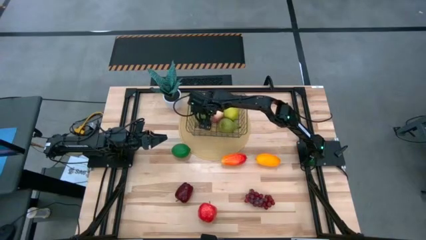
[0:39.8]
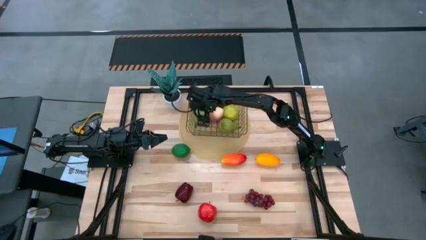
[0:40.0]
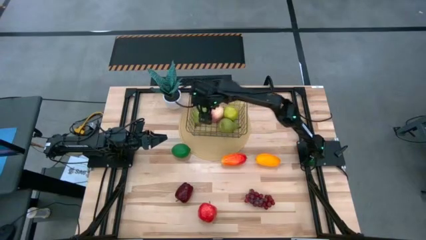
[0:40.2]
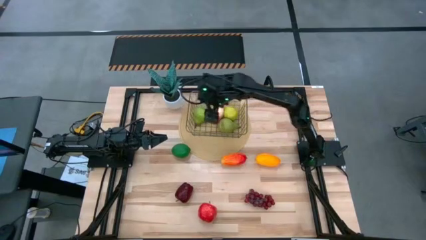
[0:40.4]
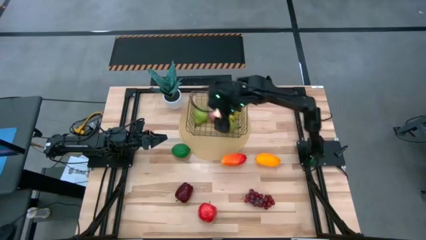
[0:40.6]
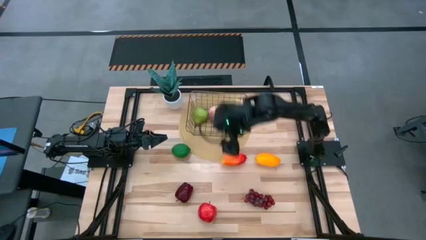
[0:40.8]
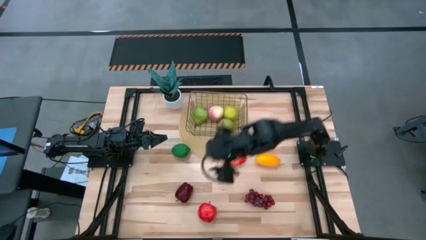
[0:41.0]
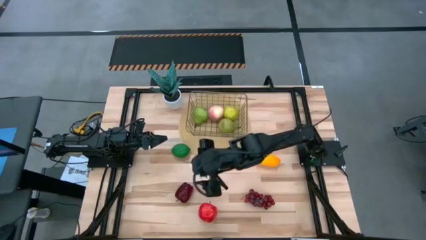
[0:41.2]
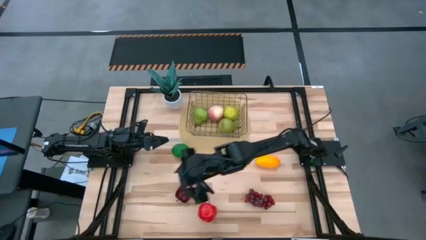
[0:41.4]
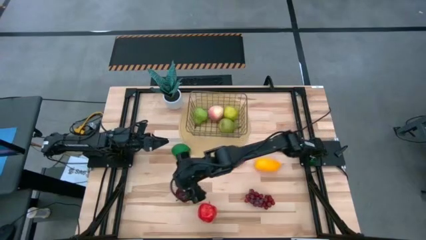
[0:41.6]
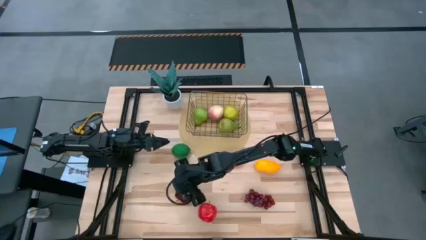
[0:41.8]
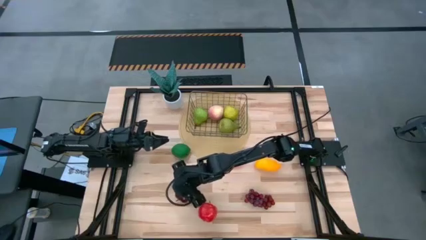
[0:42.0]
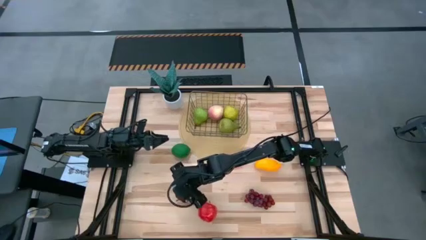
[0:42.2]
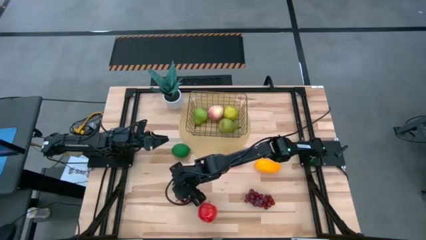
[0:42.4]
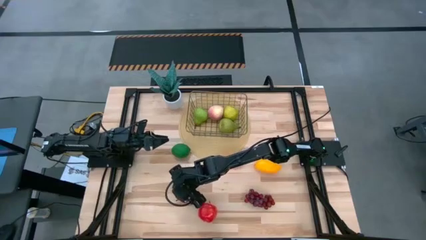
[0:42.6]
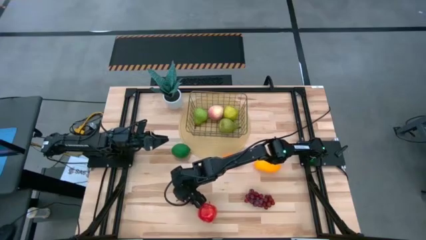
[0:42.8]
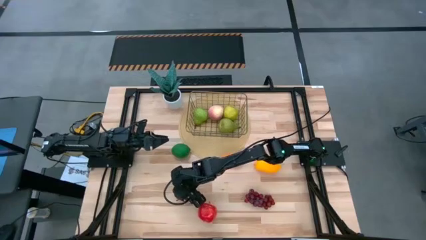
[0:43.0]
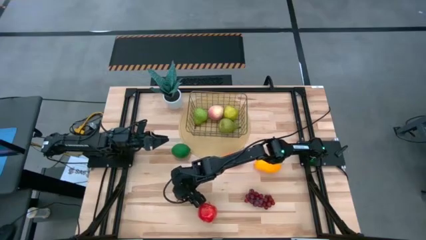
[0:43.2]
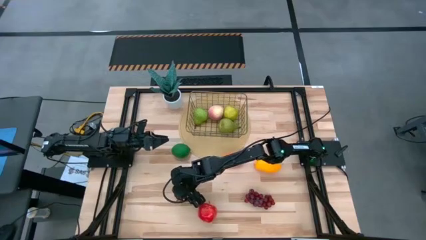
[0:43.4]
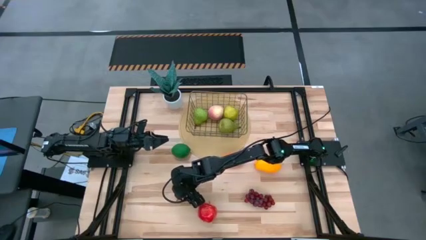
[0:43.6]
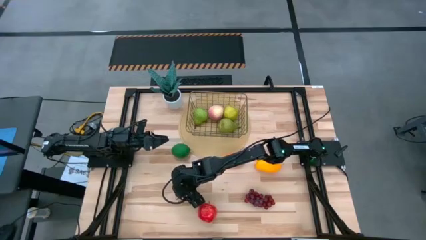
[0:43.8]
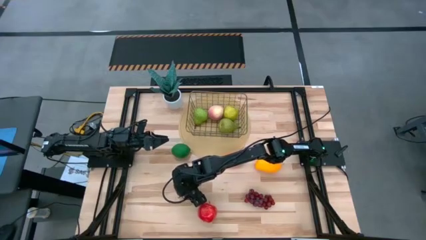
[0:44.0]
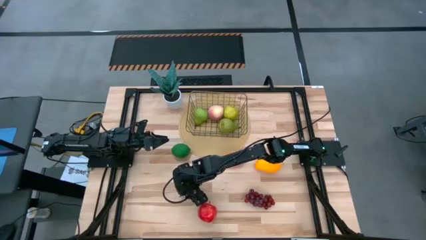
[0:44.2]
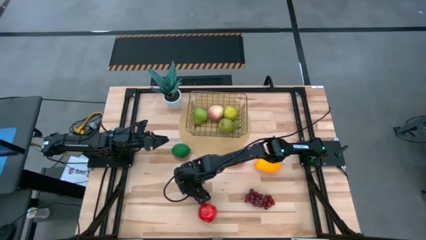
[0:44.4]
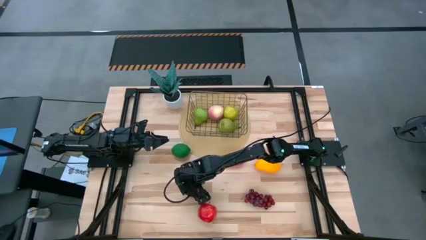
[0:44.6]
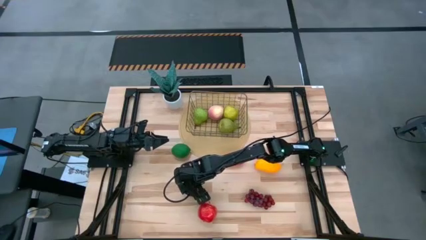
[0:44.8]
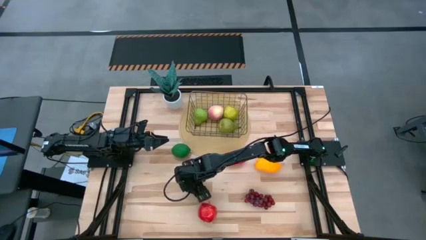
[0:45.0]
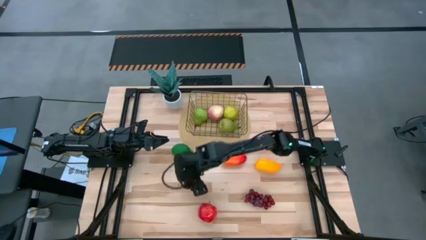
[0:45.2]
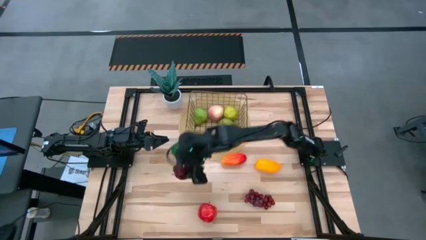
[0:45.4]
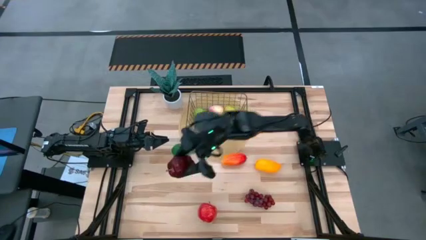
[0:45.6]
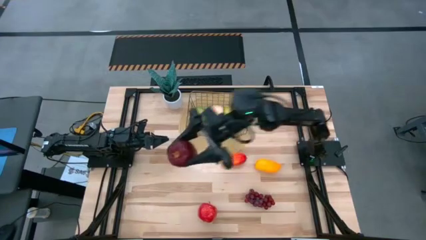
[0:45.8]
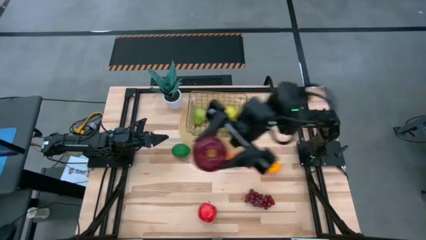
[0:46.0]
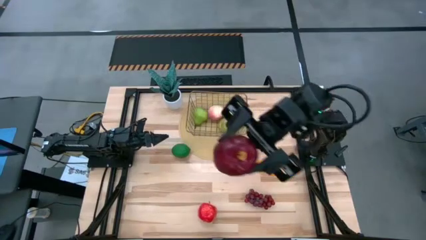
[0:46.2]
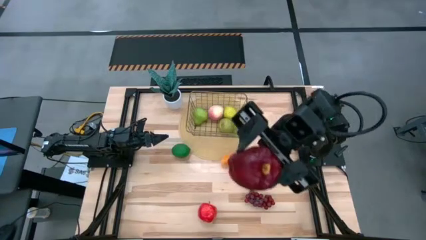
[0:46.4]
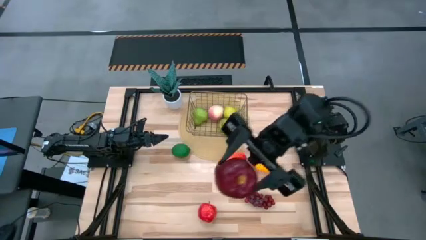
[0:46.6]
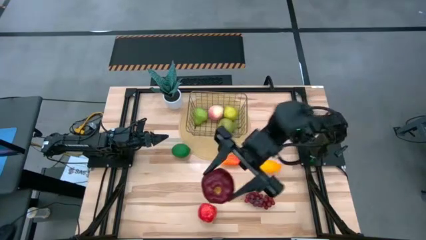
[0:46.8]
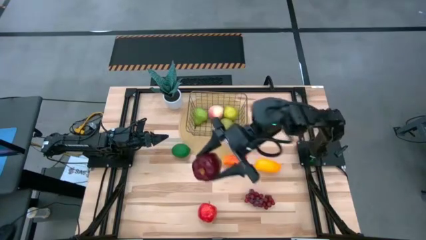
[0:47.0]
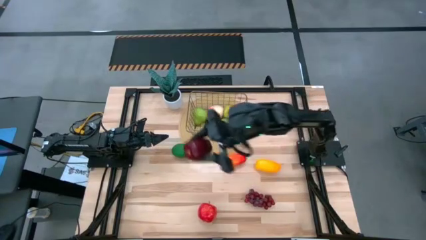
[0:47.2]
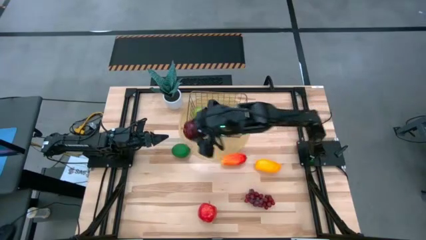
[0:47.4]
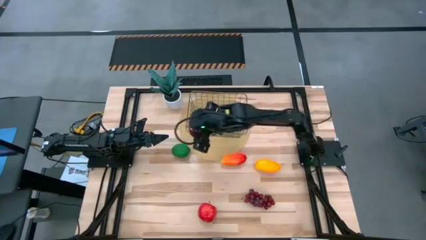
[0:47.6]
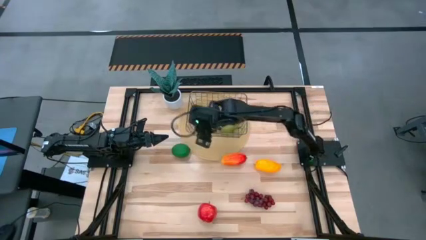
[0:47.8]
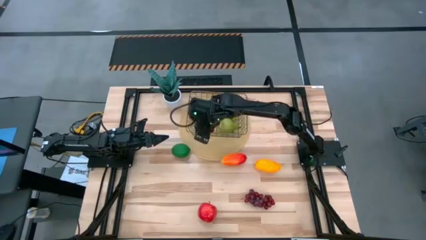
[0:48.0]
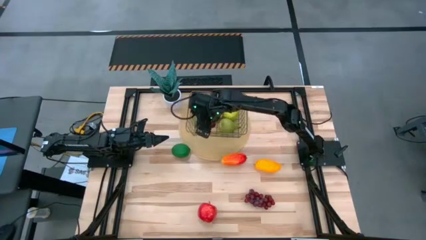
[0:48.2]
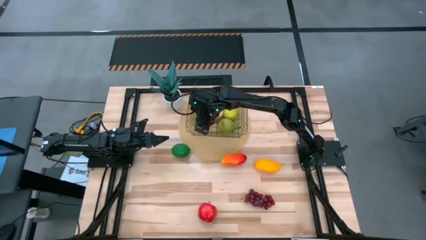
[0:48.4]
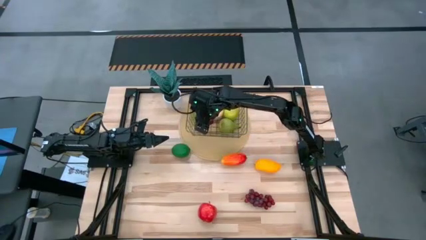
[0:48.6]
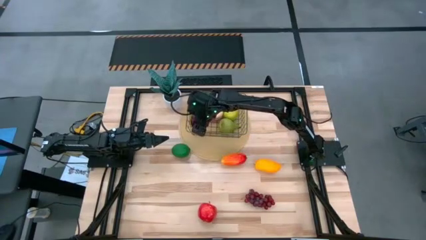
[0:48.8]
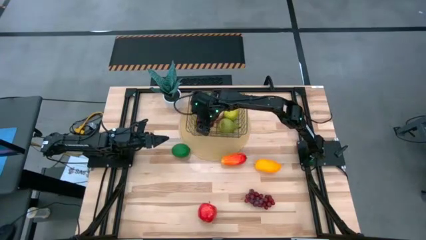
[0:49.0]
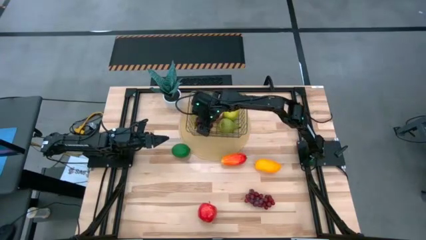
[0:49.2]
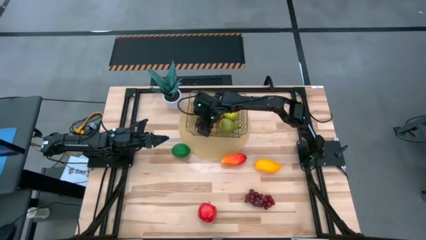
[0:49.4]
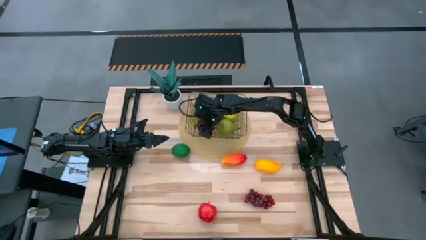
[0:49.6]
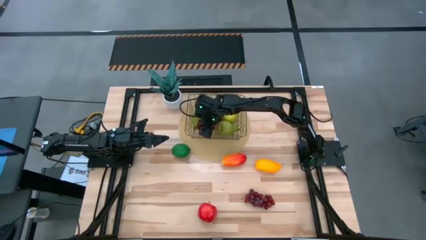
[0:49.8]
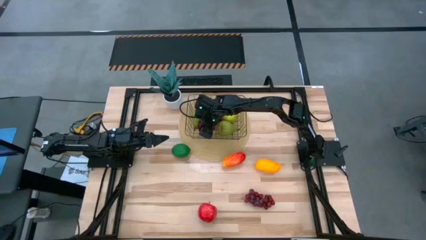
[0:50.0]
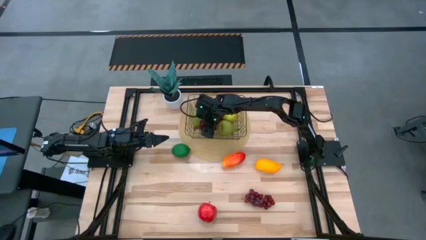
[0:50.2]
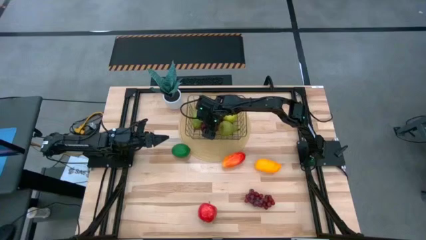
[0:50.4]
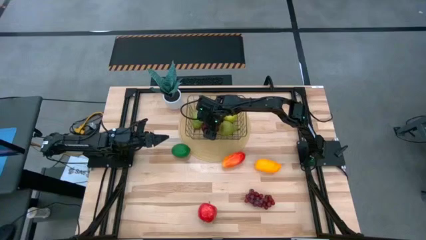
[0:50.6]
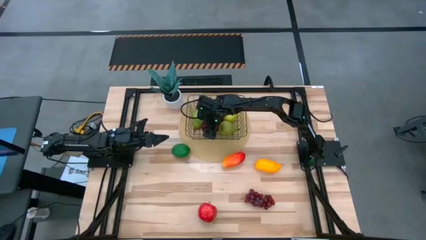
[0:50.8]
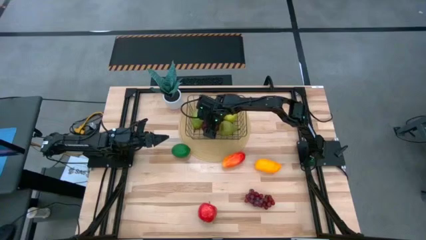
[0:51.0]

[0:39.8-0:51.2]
Task: Build produce basket
Put the dark red apple into the wire basket

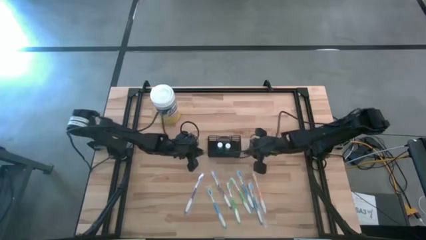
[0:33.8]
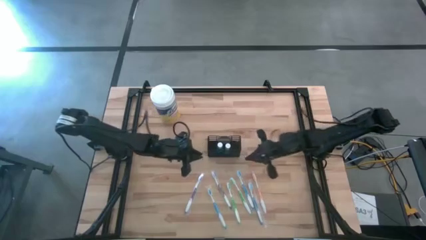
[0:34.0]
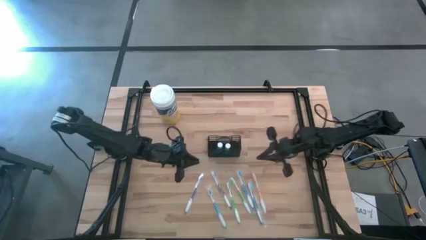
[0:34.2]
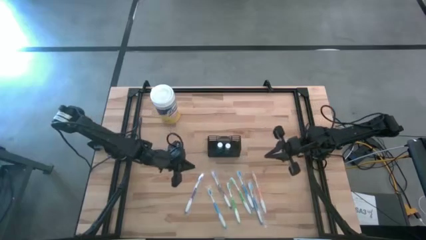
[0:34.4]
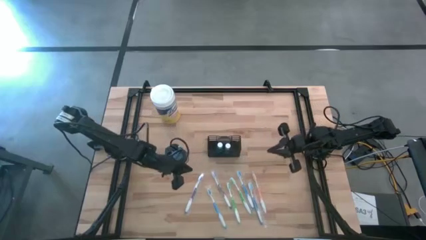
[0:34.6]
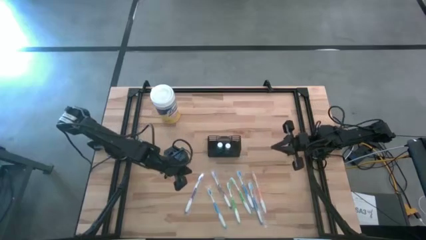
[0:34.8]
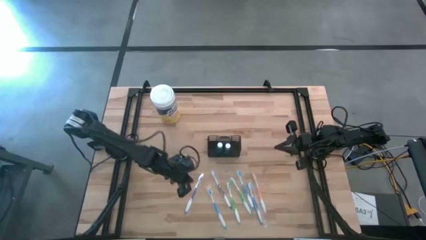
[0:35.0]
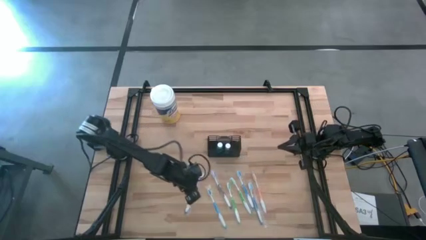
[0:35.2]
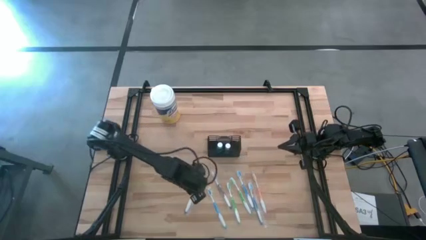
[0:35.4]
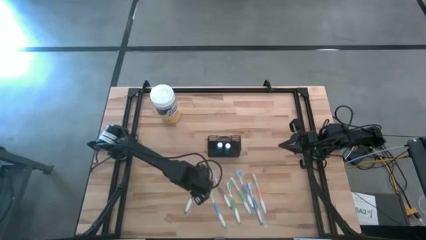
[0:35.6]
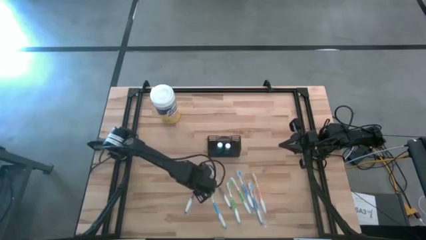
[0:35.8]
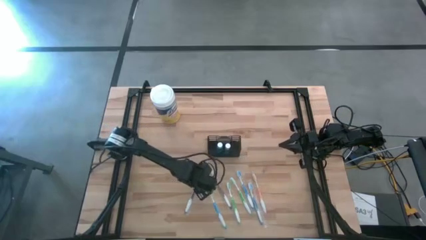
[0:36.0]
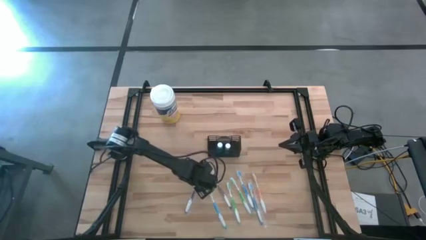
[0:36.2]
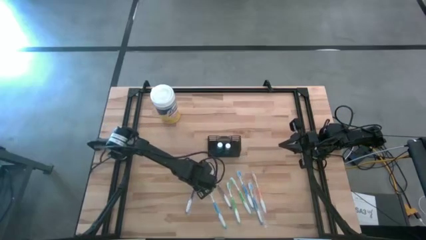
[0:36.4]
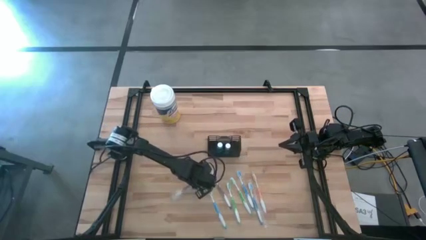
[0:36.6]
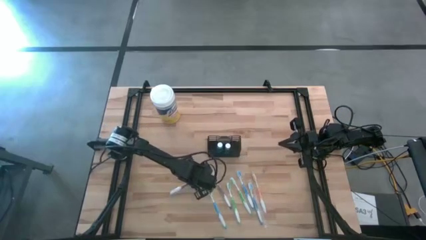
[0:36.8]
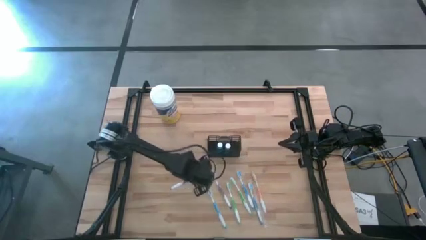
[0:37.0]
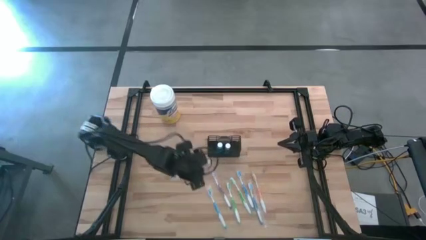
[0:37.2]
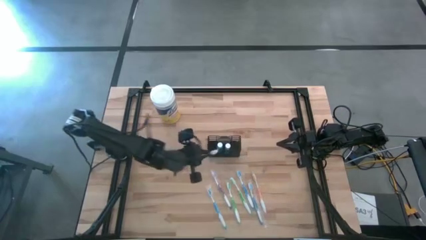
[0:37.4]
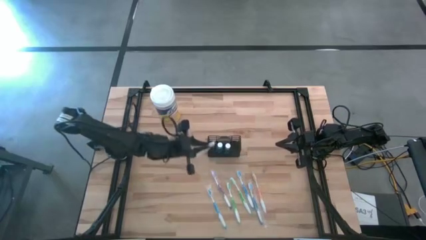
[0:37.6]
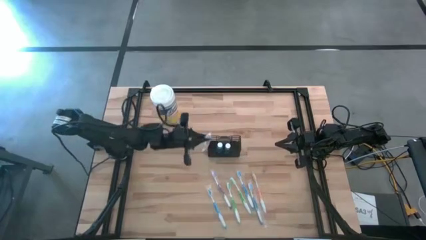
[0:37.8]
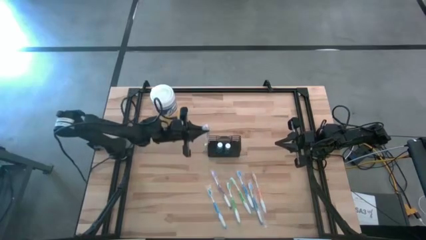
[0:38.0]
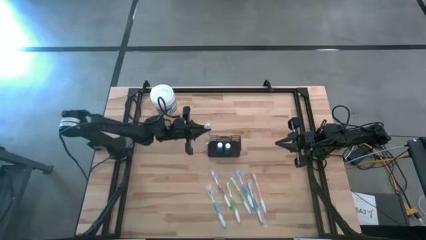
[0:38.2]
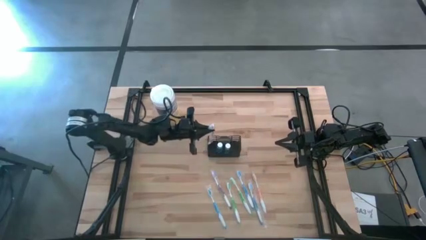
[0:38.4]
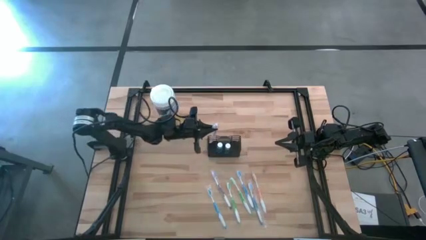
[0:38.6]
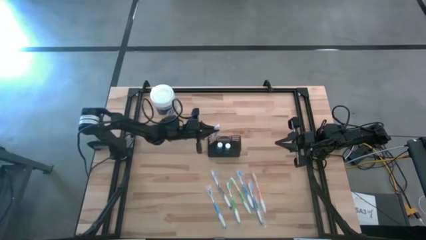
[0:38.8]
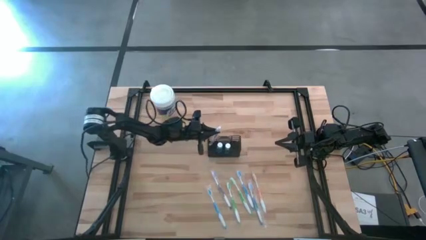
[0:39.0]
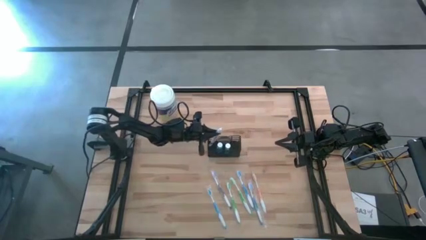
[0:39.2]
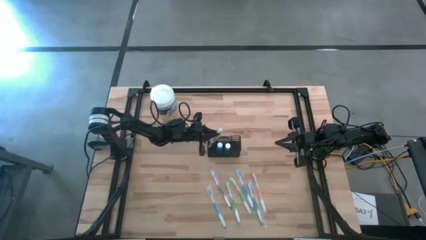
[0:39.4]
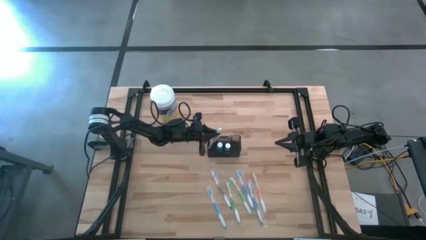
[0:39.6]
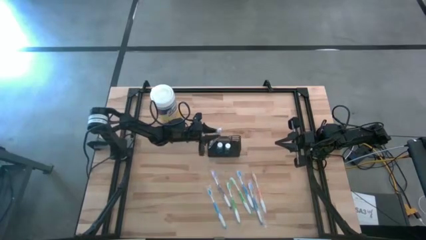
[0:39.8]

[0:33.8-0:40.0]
Task: Pick & Place toothbrushing station
Put the left purple toothbrush into the wire organizer
